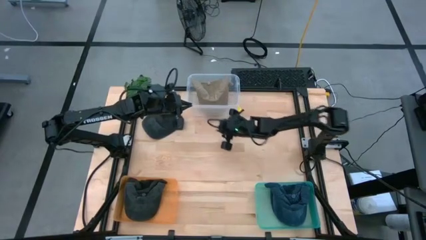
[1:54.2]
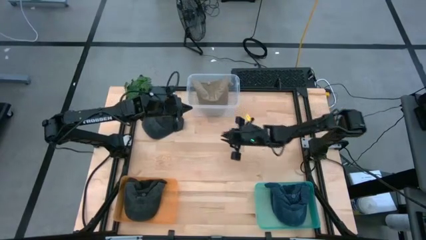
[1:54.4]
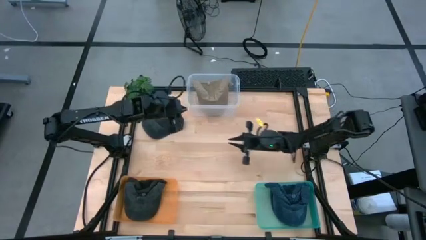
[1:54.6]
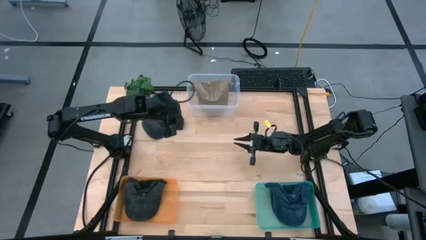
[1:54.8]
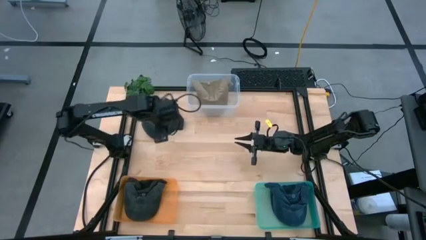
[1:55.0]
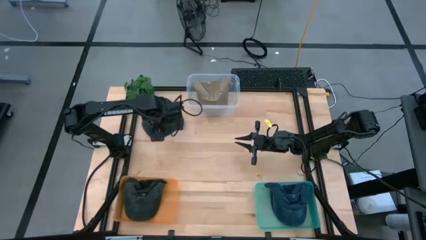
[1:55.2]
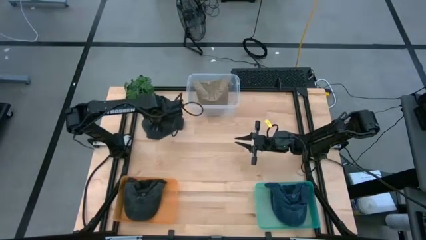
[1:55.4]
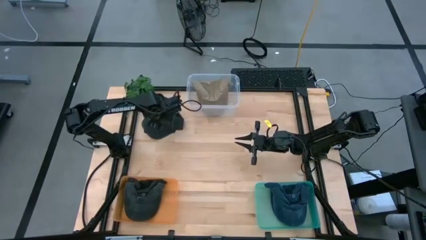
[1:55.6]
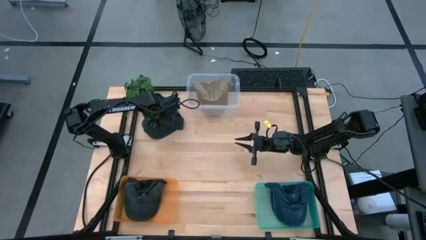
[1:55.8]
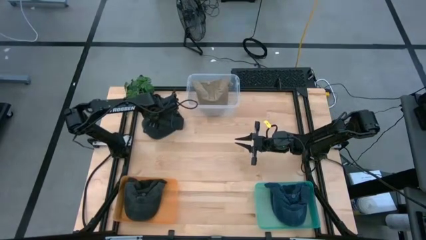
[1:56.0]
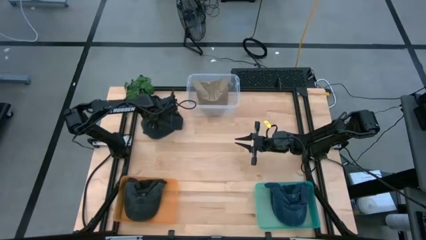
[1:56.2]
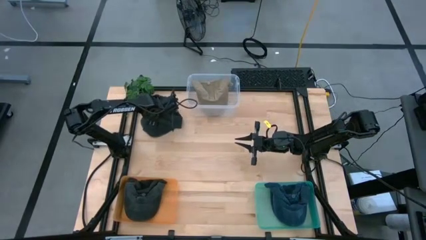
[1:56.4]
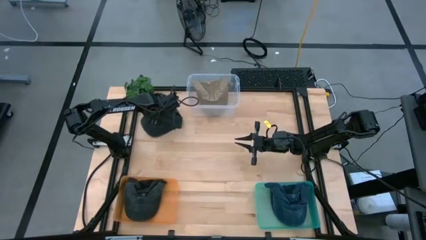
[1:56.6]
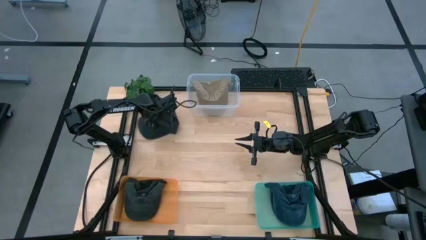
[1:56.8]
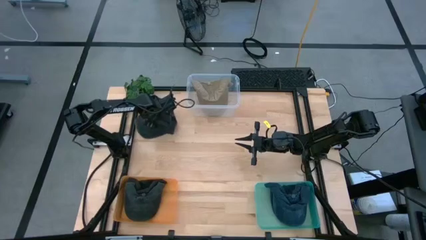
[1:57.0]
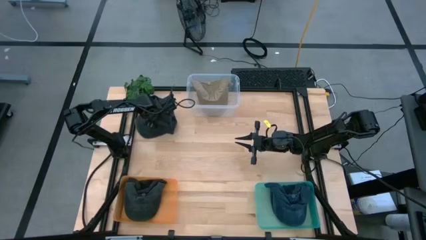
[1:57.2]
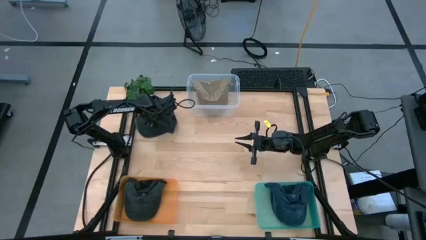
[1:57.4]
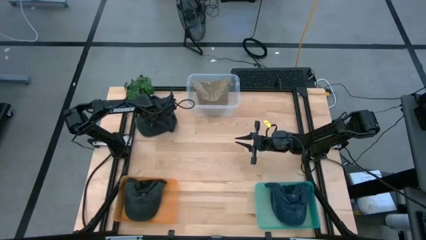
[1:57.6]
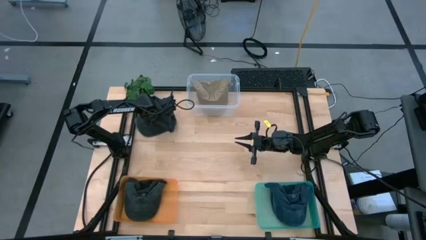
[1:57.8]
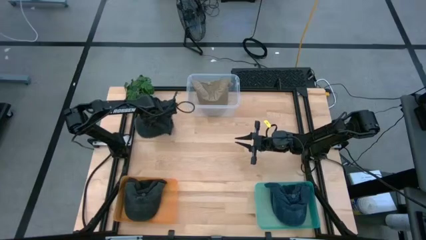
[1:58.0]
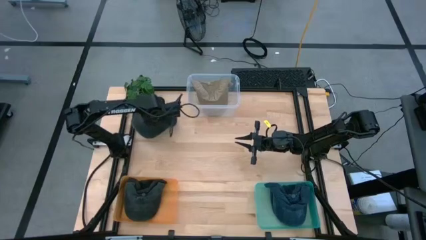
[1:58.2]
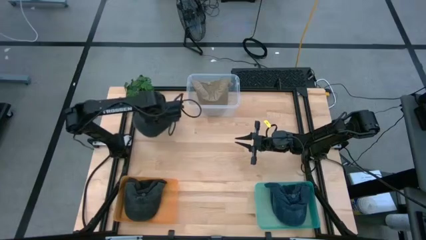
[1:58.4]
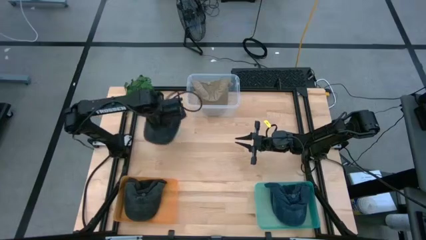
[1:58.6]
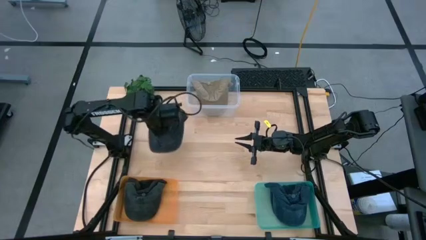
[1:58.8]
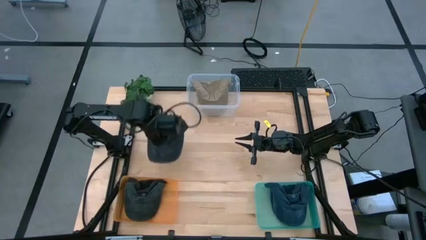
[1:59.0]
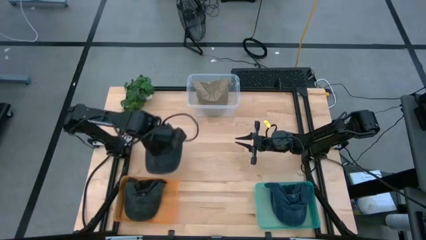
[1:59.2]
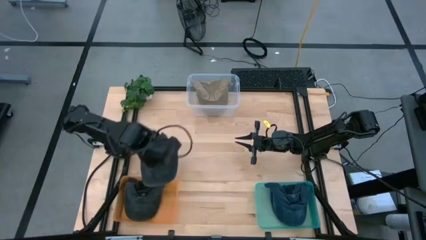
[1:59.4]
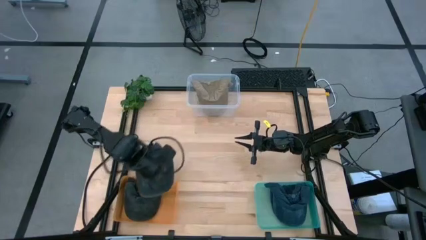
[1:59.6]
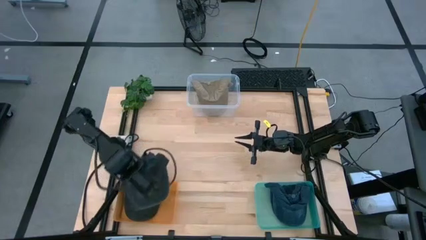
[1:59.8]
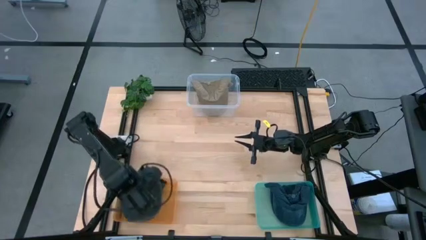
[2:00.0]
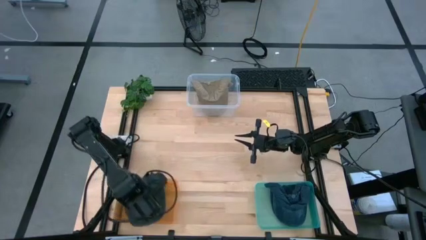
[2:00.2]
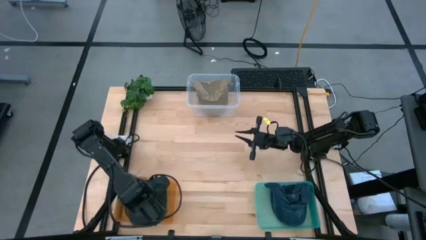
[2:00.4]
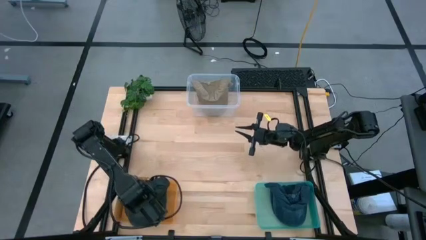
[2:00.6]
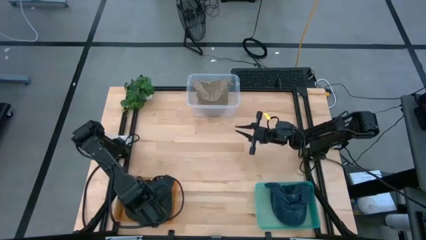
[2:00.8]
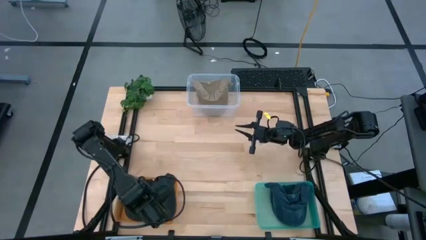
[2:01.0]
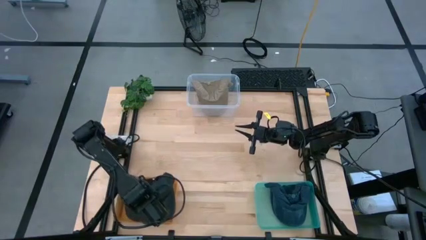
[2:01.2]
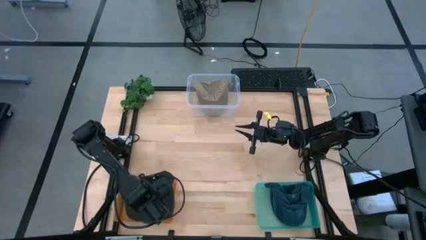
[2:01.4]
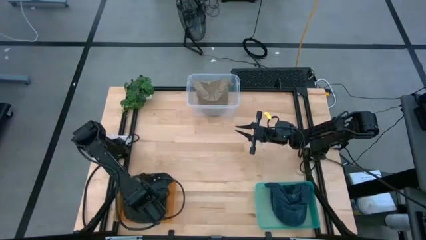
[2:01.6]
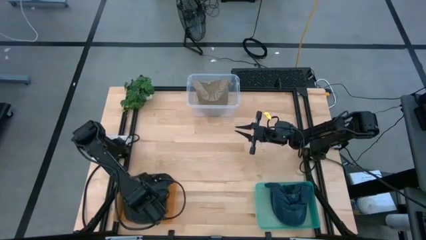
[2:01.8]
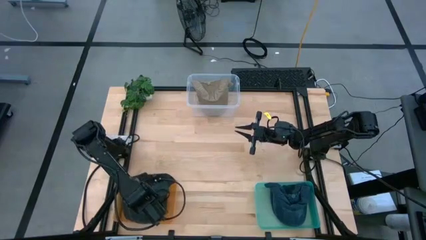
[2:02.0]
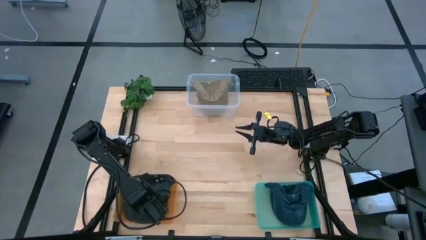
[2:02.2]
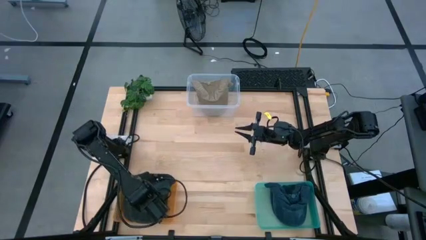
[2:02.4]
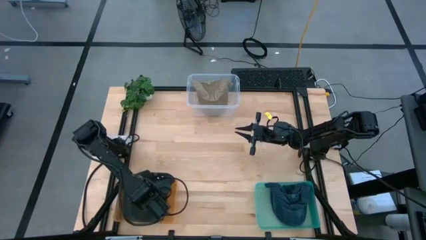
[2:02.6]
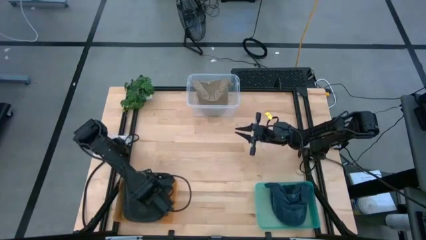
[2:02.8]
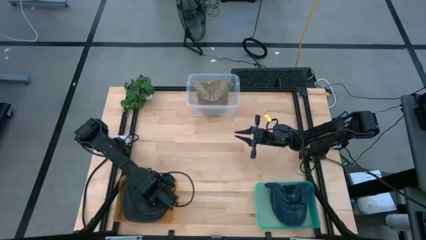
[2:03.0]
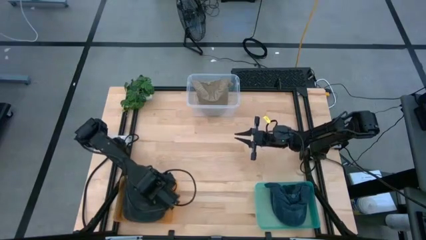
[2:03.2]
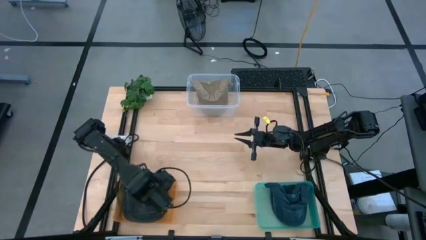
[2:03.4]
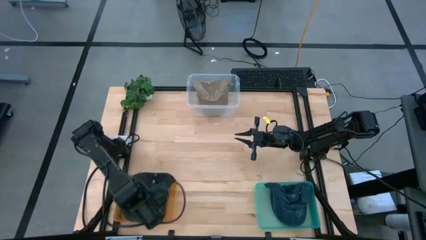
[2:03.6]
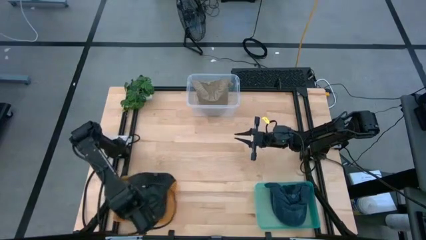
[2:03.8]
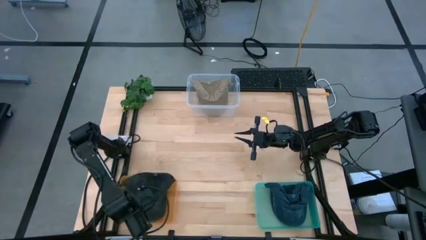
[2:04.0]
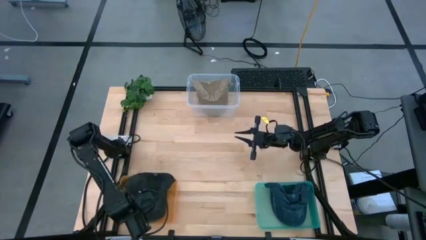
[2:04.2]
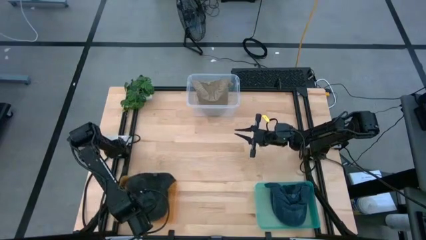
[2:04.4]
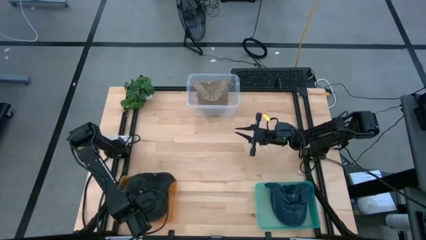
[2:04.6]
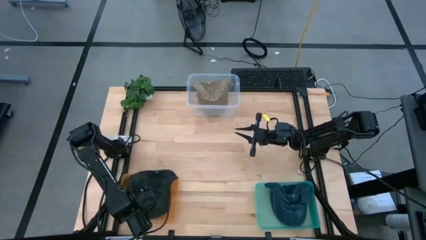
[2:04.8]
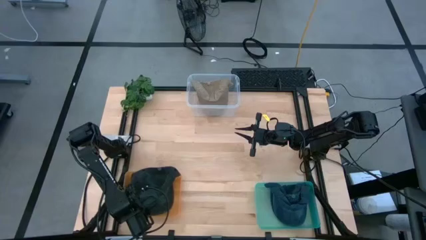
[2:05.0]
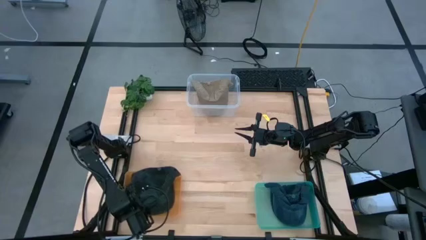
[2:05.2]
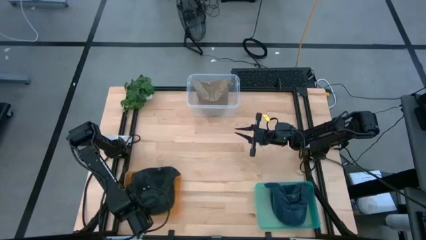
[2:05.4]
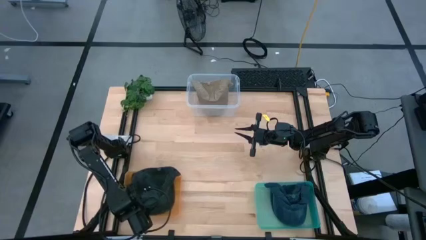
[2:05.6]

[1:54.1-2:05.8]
Task: Pick & Place hat
Put the black cap into the orange bin

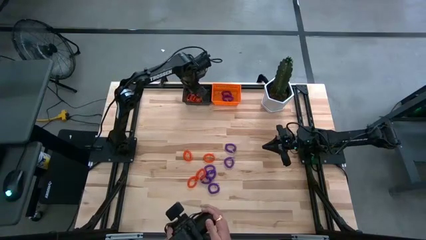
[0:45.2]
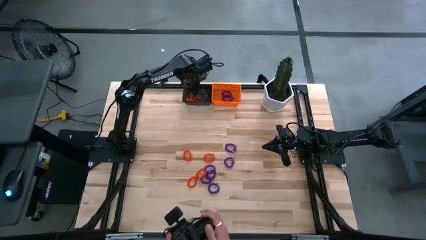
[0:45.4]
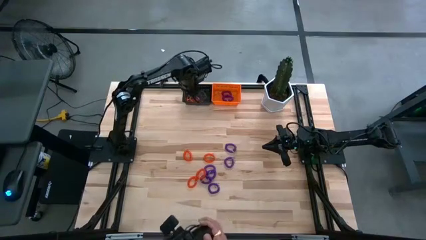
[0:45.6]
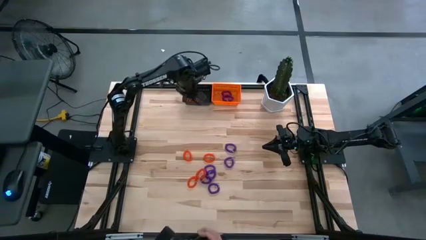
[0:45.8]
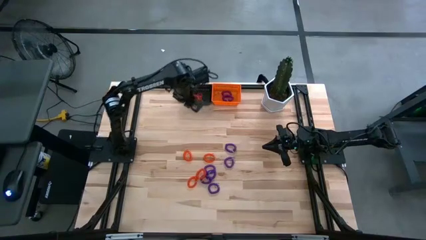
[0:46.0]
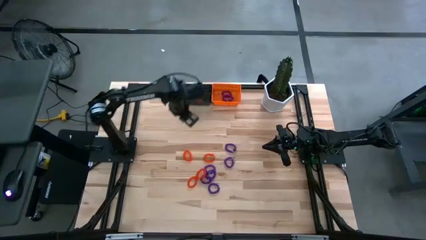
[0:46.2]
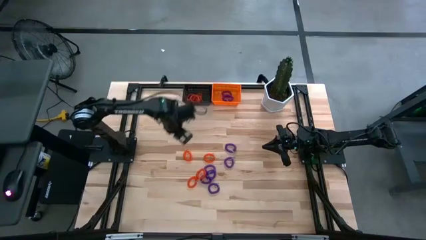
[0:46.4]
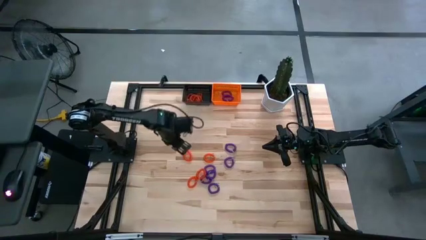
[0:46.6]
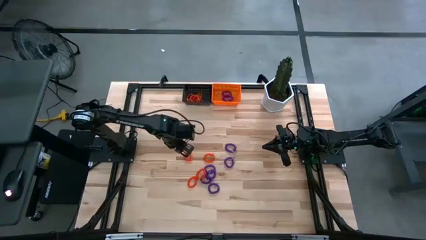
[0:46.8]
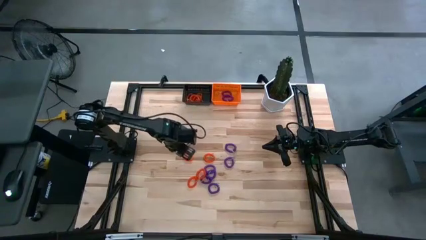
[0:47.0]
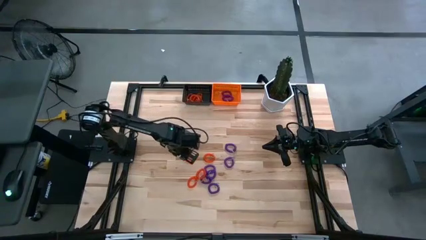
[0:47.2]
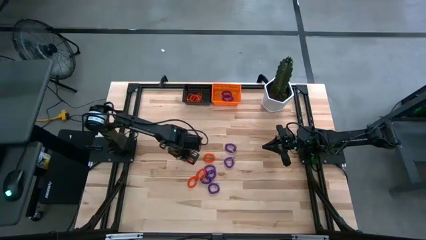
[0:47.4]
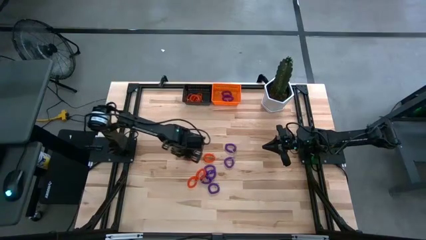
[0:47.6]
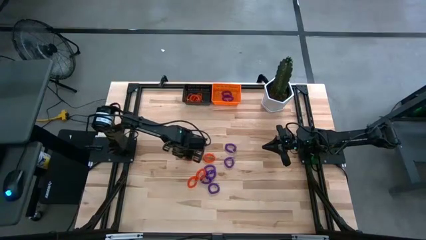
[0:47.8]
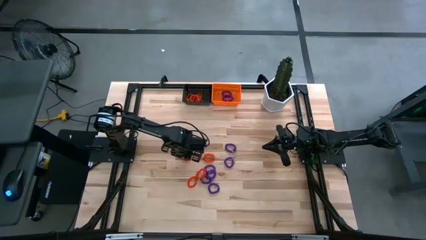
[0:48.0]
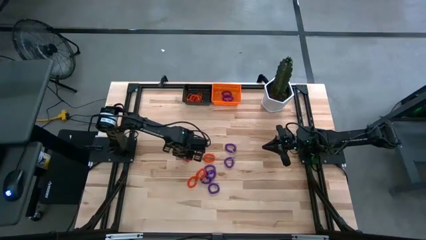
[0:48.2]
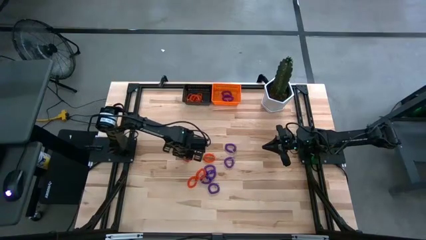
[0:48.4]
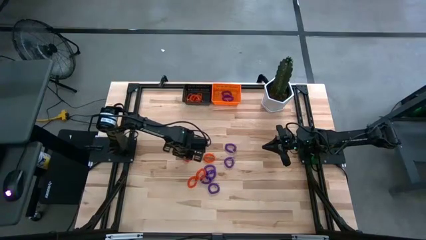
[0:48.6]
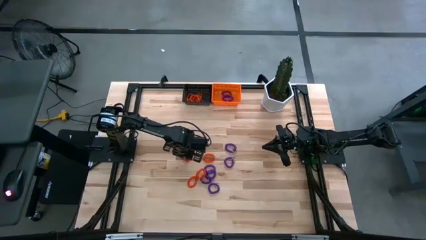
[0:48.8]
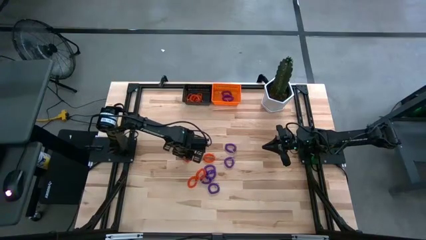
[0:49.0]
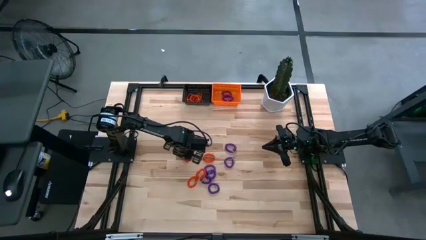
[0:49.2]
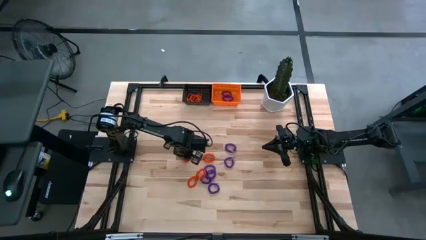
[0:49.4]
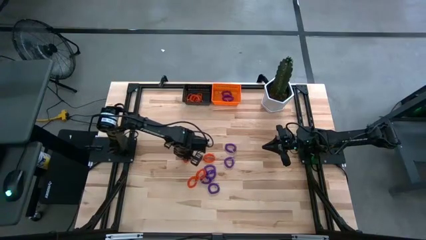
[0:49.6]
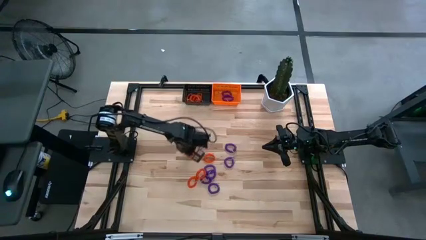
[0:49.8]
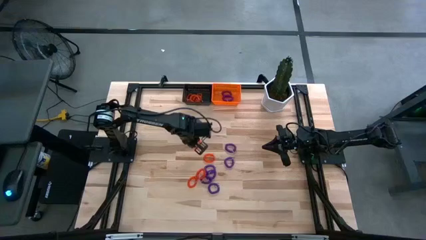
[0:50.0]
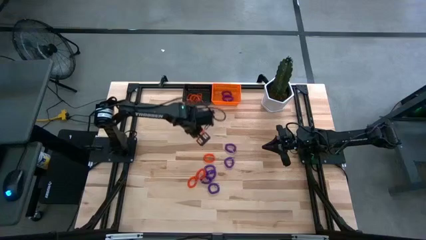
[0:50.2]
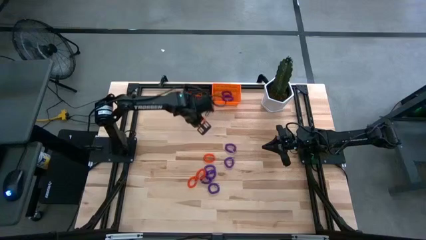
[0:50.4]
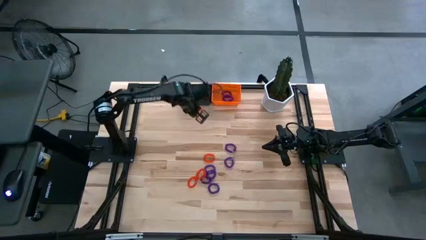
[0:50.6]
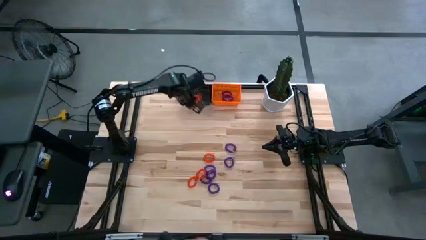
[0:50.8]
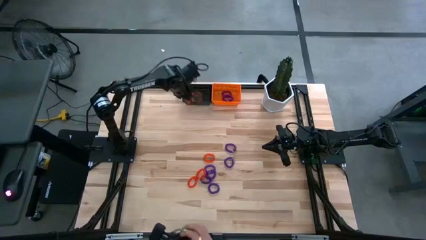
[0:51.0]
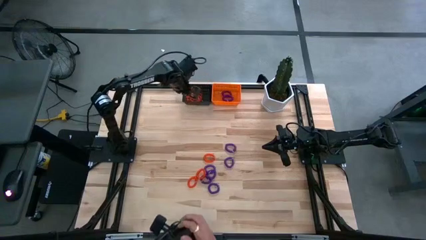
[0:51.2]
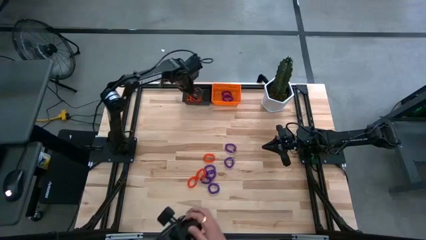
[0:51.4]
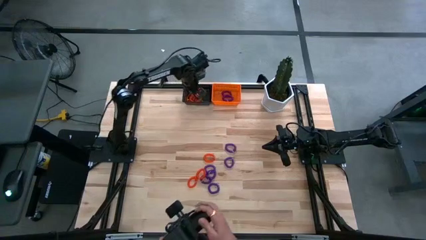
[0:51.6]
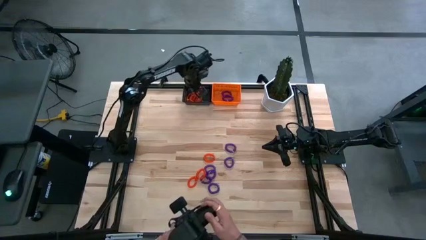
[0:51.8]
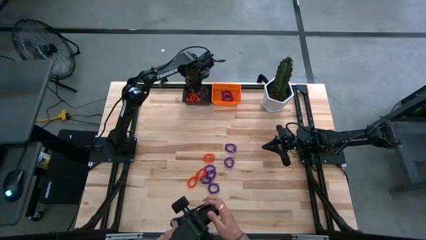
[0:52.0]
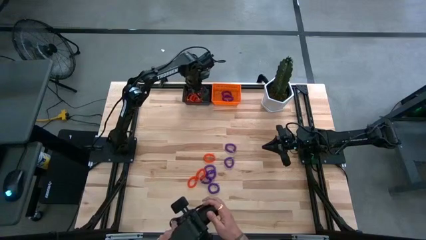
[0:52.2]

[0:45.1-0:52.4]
Task: Sort spring keychains into baskets
Put the orange spring keychain into the black basket
